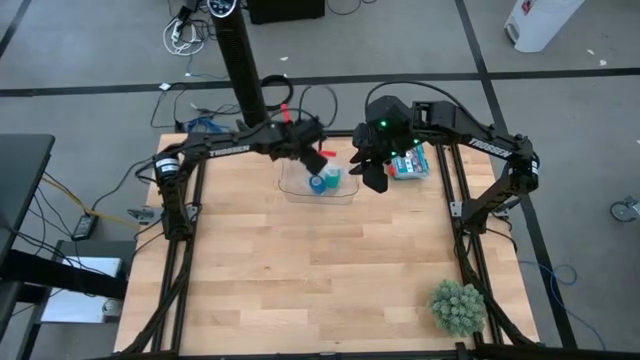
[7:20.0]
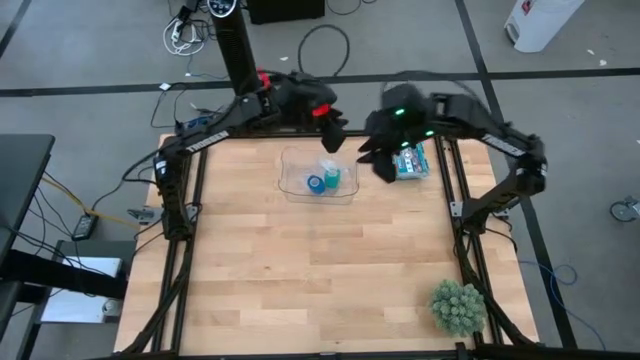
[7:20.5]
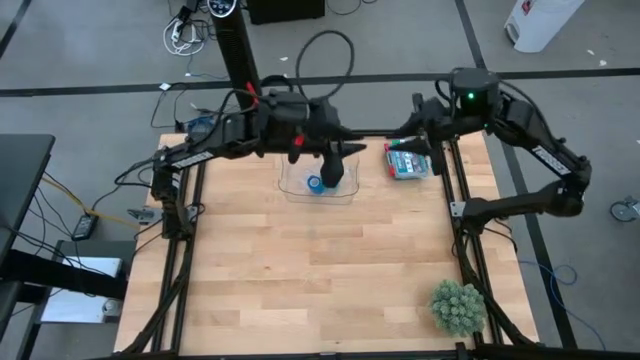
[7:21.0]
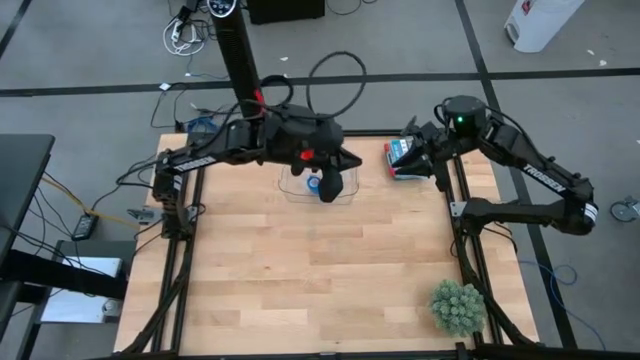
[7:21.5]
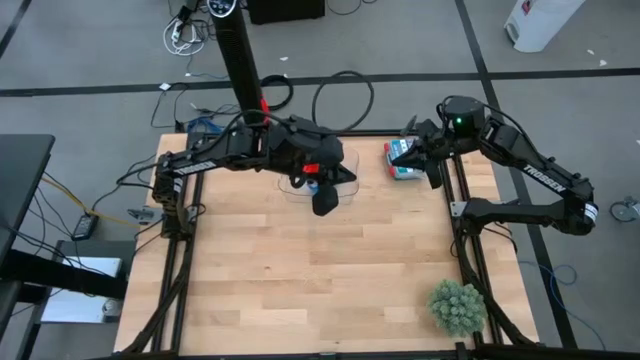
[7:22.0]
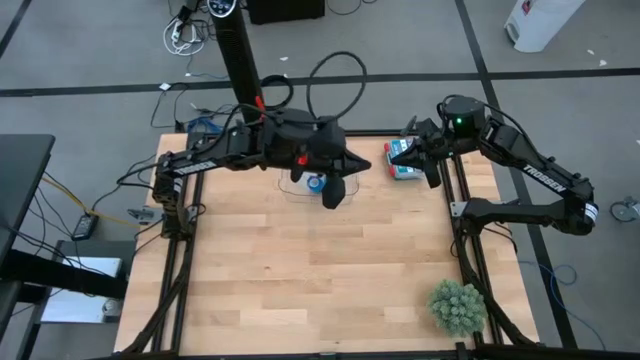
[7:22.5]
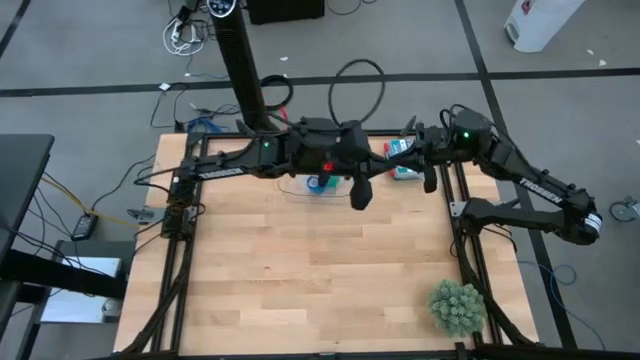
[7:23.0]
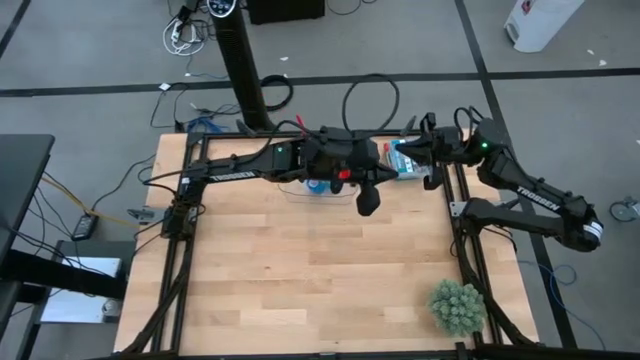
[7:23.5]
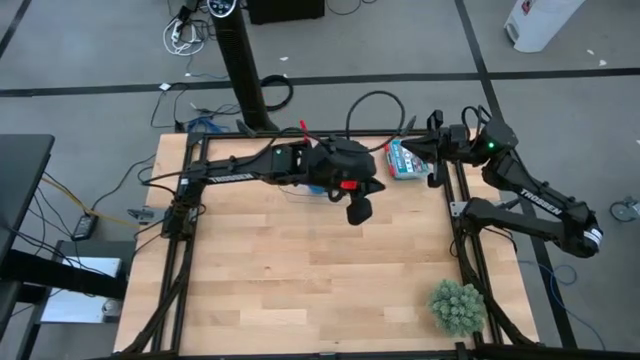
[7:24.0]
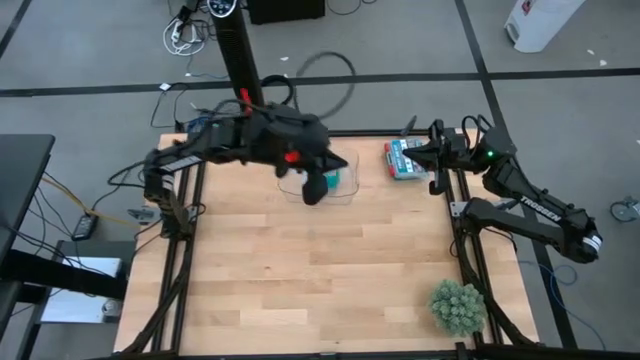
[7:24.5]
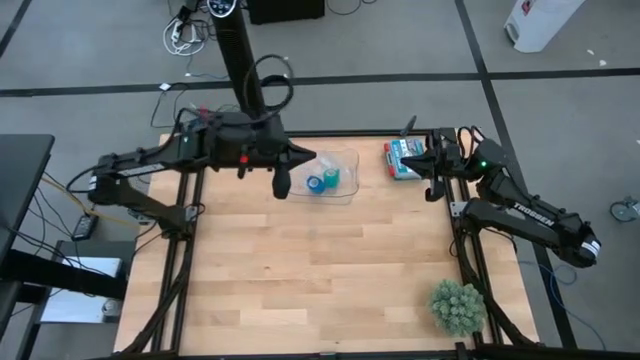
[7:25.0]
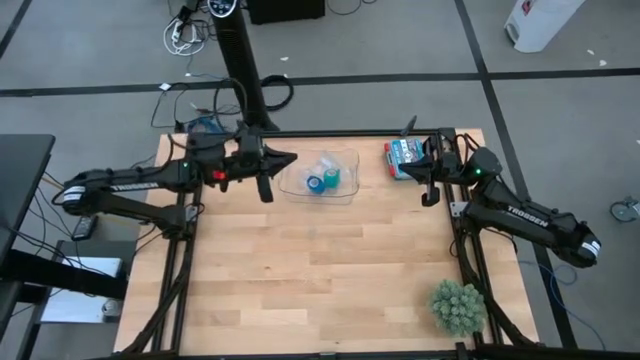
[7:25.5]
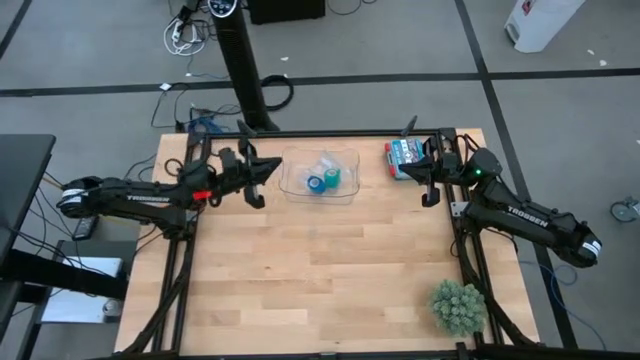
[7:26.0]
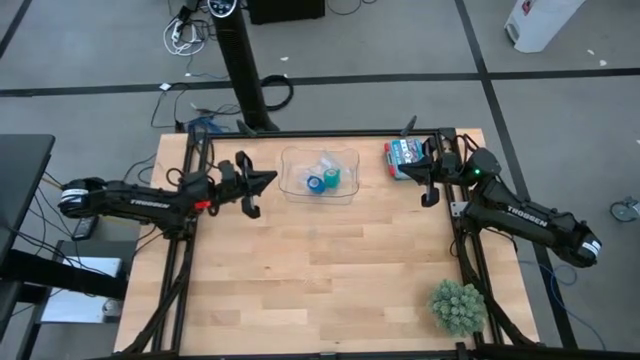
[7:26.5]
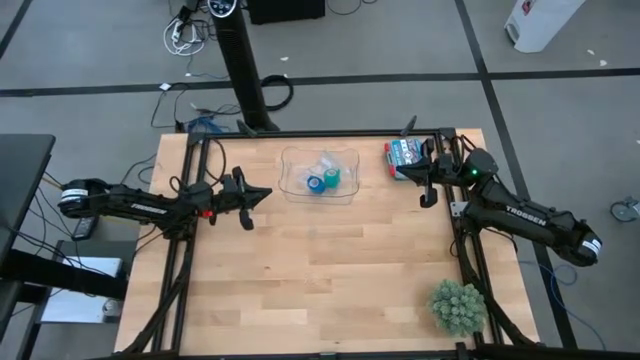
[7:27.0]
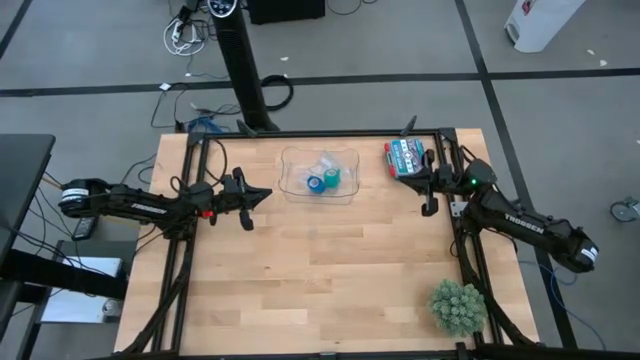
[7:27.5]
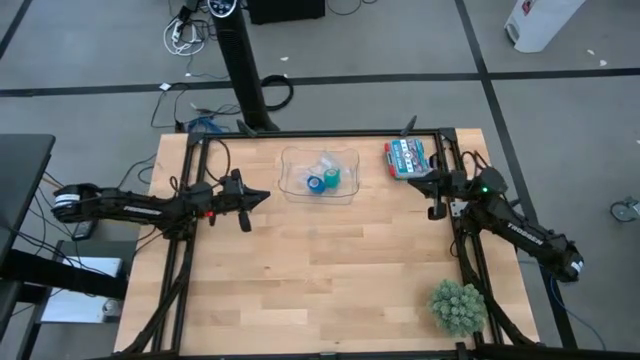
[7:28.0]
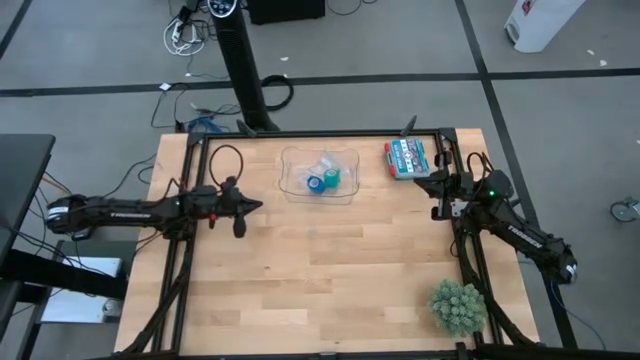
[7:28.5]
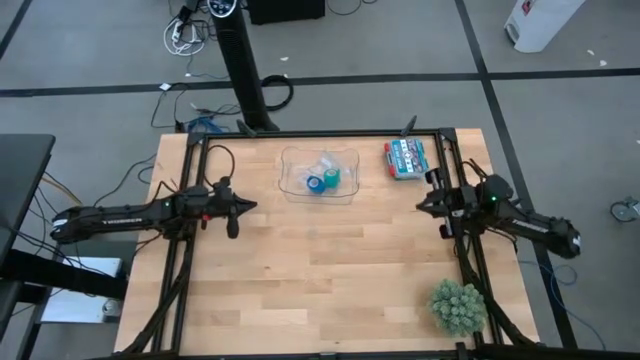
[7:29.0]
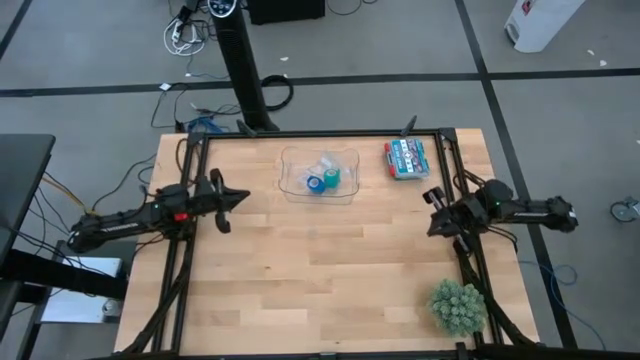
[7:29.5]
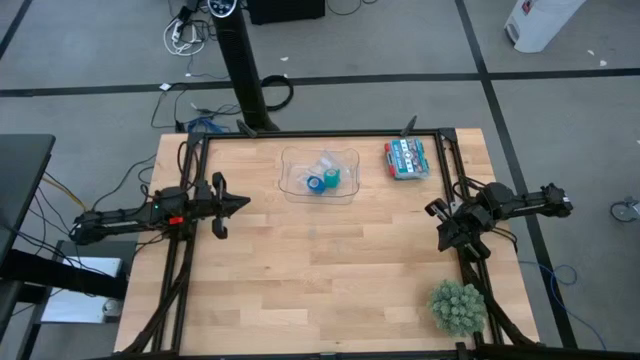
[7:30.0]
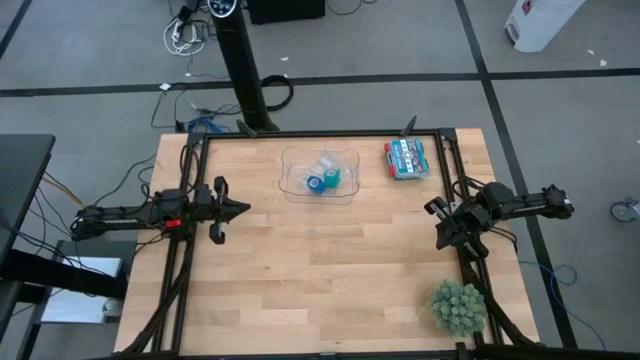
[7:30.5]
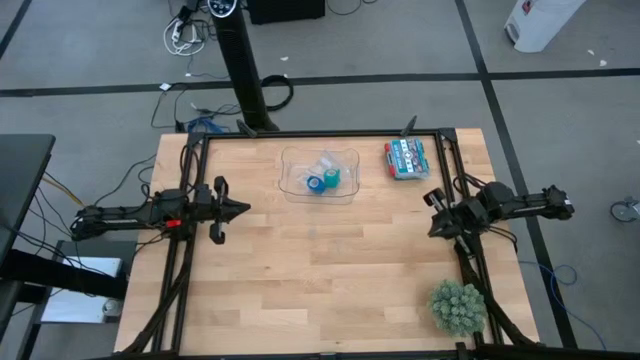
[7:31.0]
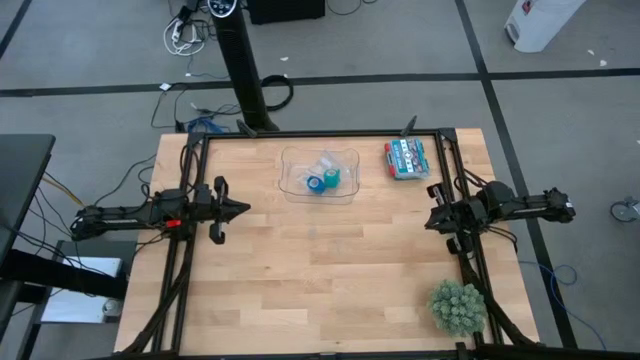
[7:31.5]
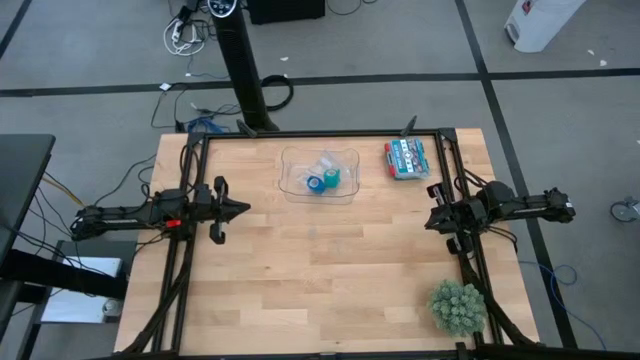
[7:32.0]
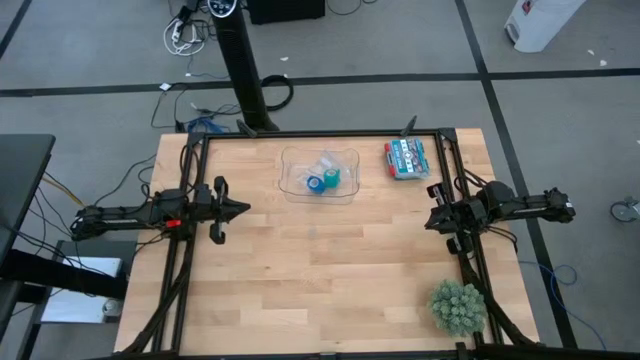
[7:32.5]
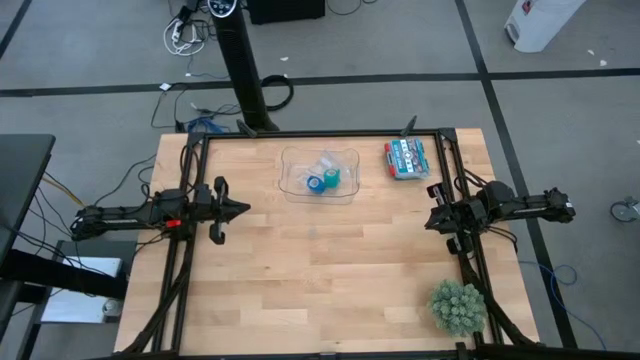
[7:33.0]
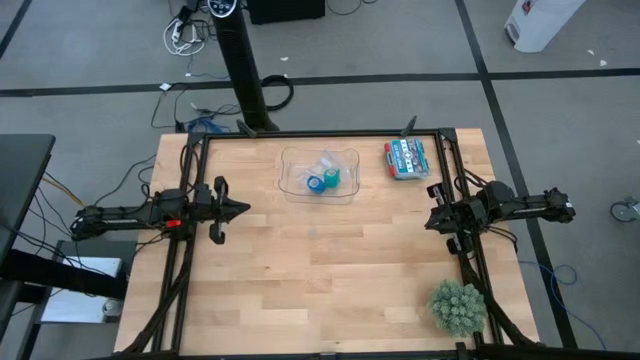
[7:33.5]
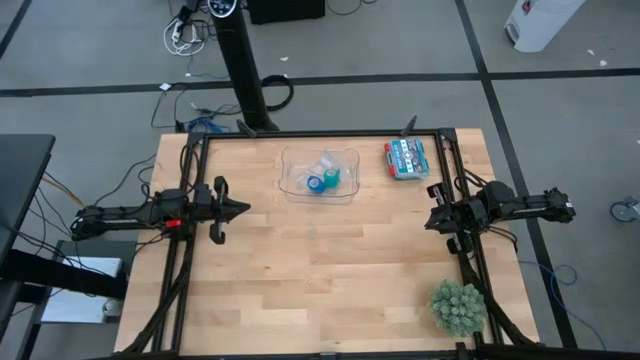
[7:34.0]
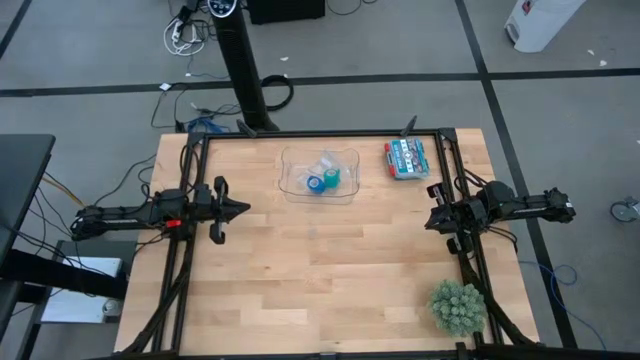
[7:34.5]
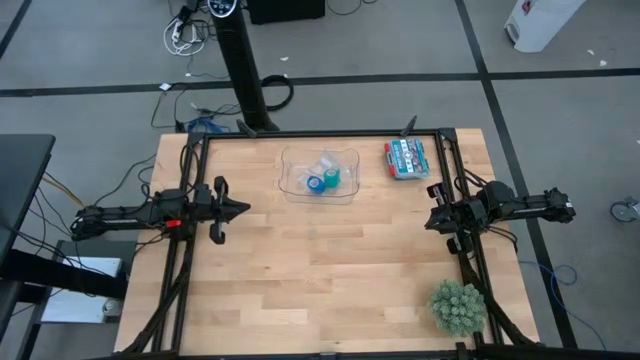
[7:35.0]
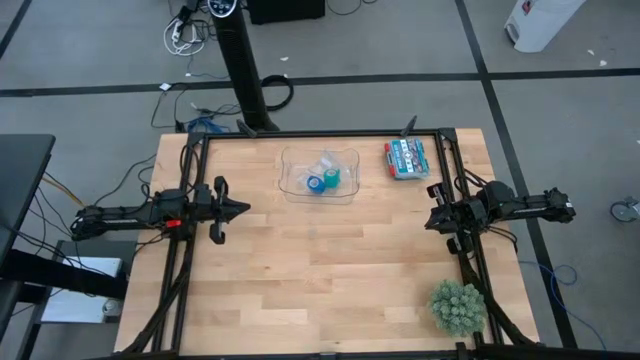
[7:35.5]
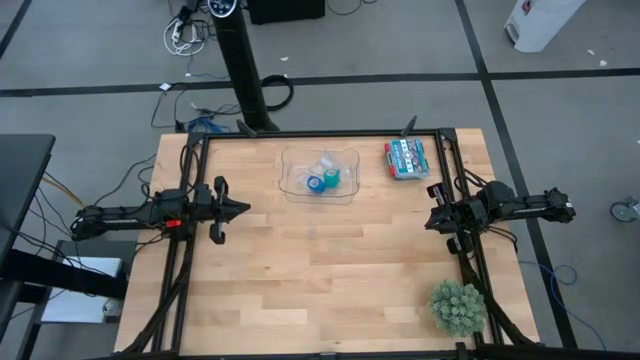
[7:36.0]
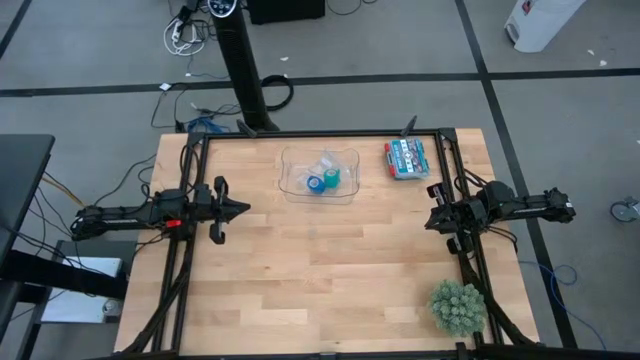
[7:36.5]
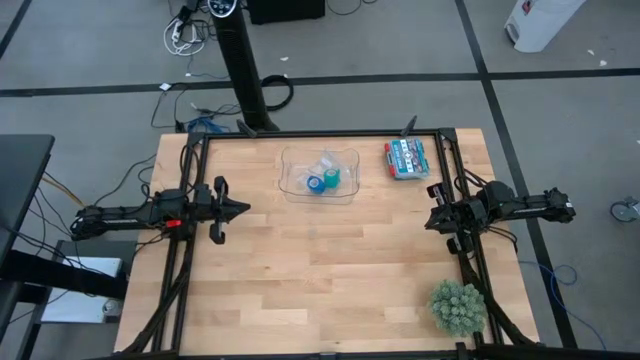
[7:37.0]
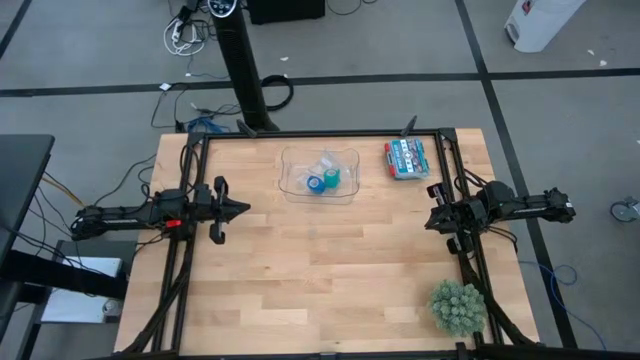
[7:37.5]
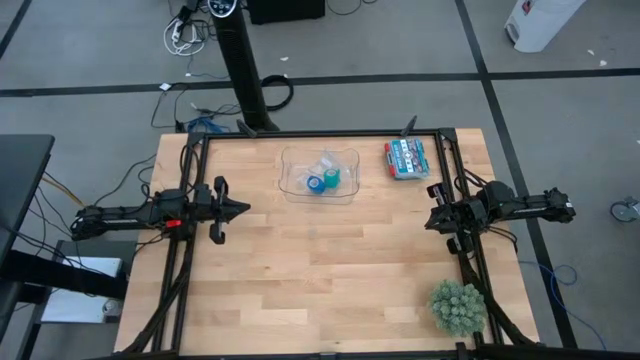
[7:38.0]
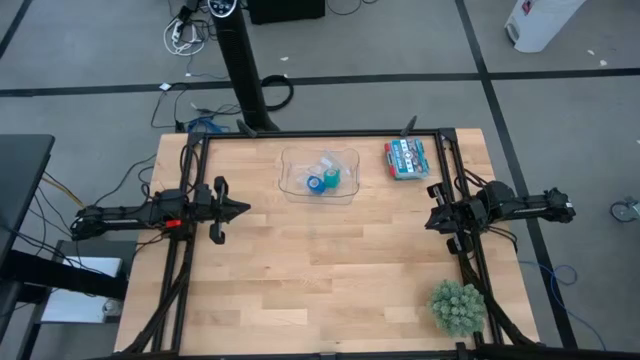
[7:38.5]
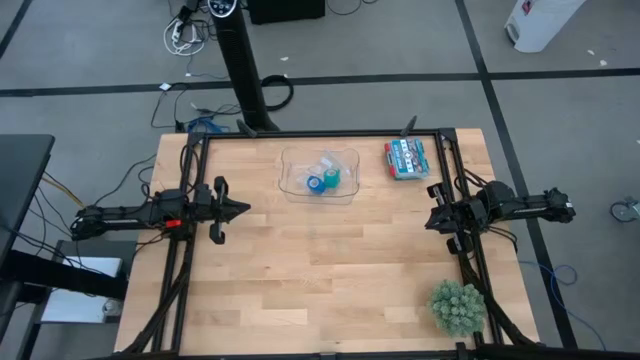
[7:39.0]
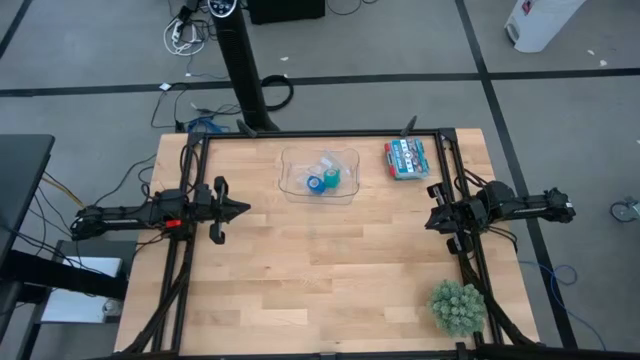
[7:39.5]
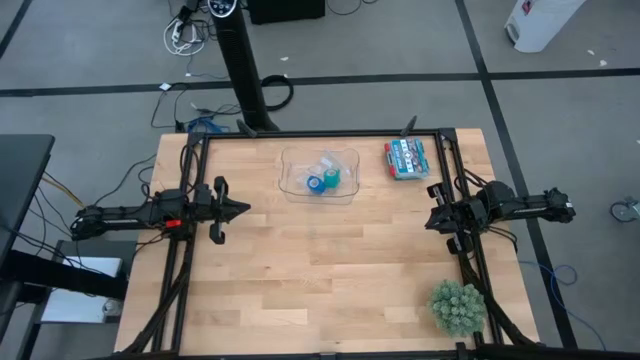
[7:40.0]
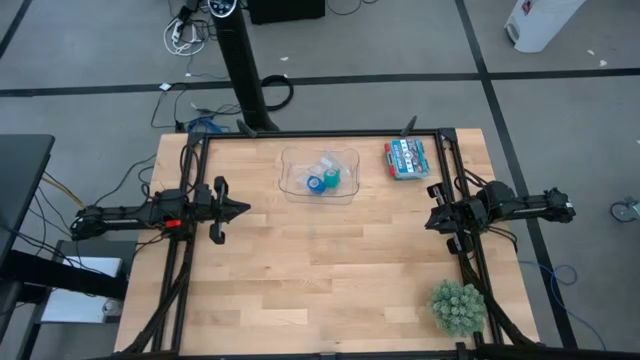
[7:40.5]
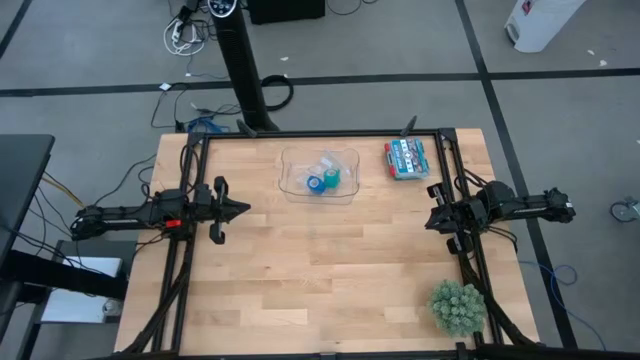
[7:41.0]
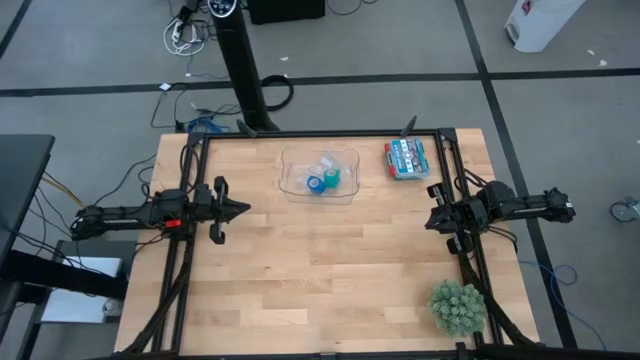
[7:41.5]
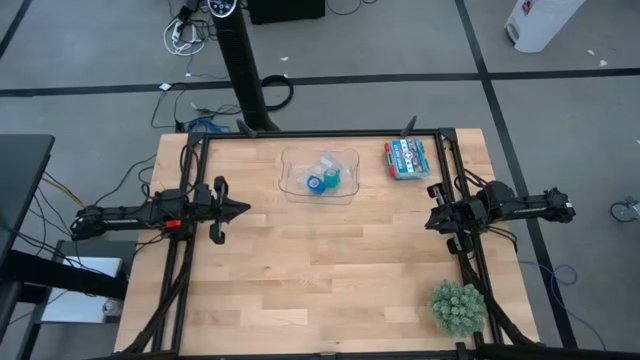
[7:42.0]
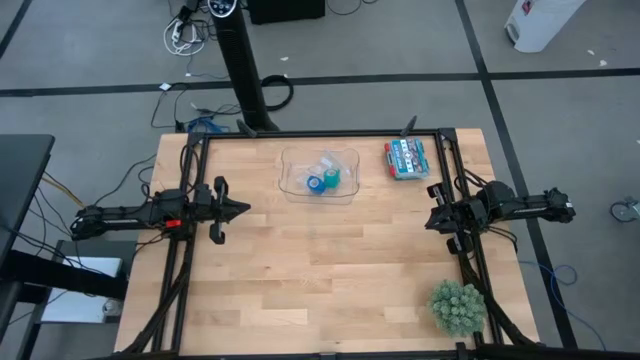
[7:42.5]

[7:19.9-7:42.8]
Task: Roll bandage
Return to Home Position
